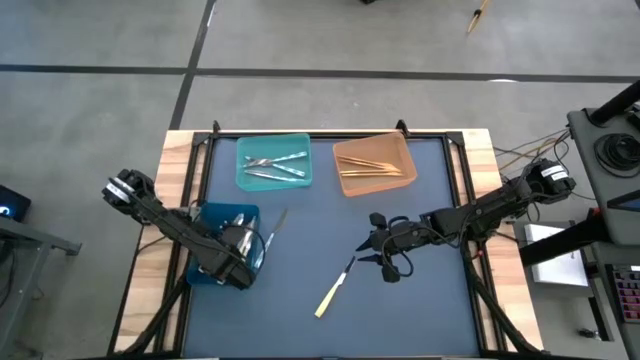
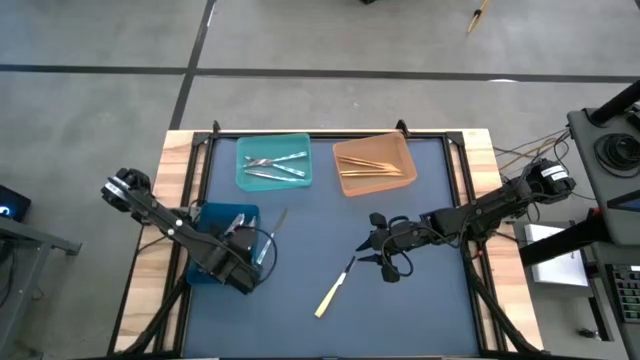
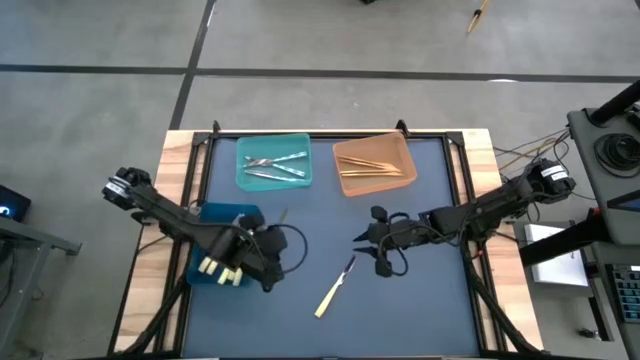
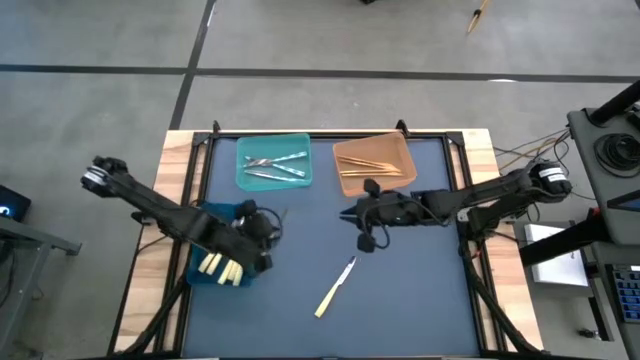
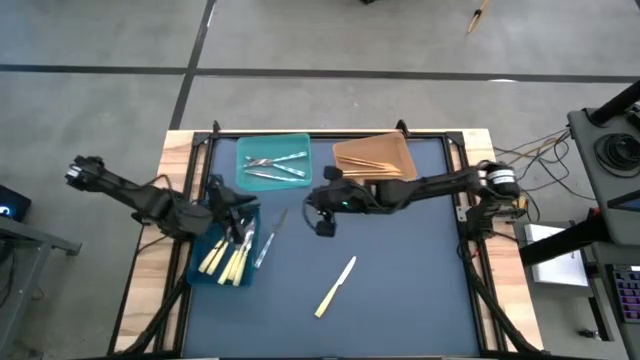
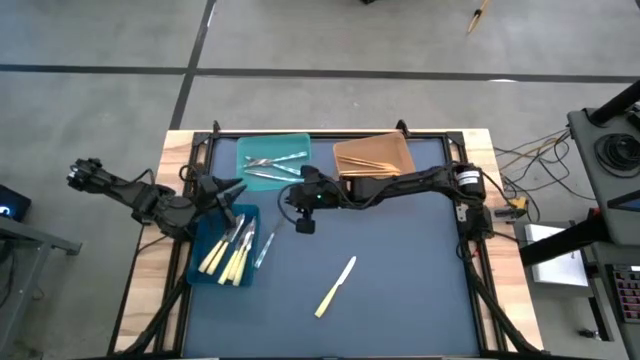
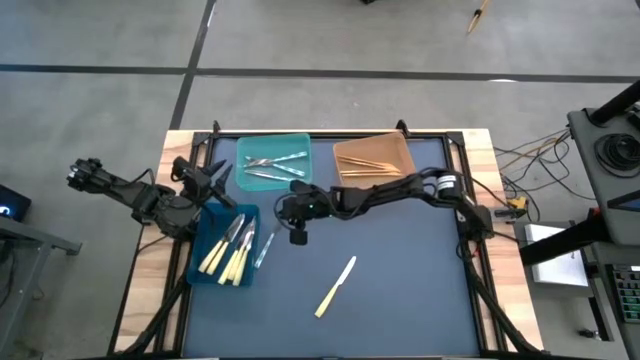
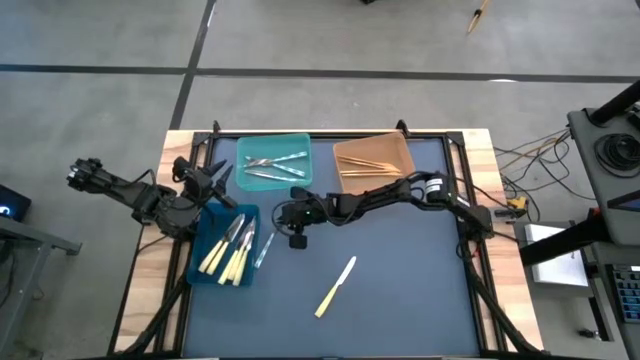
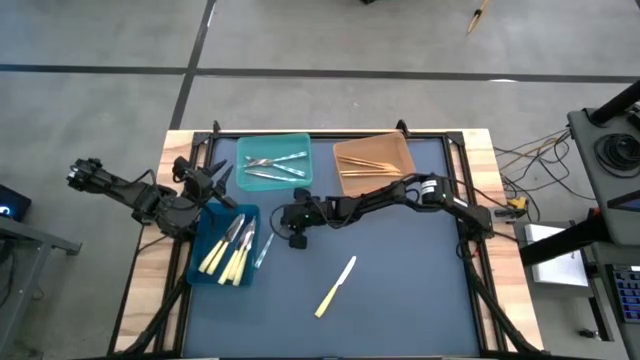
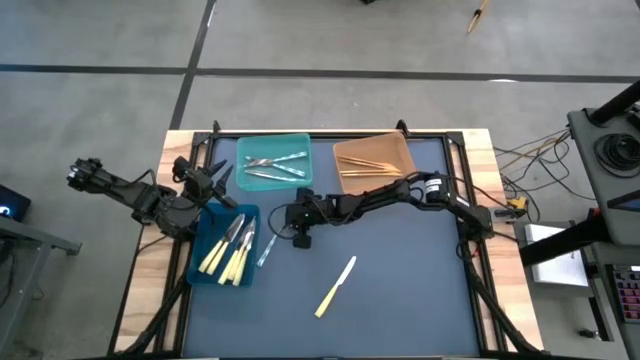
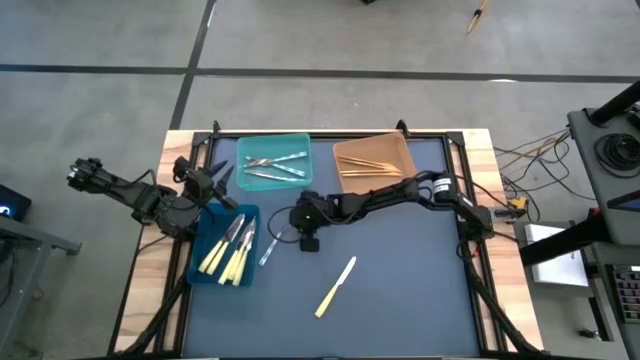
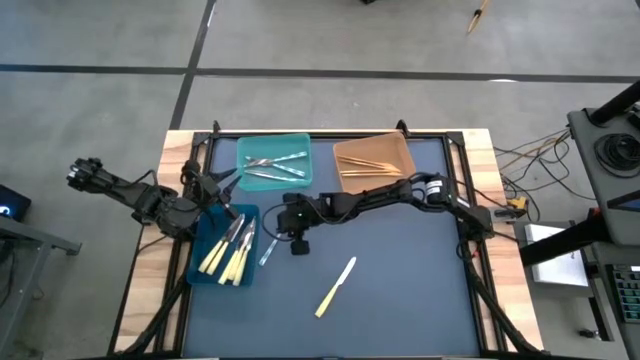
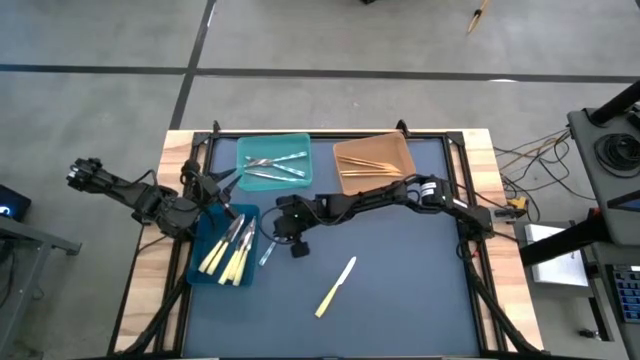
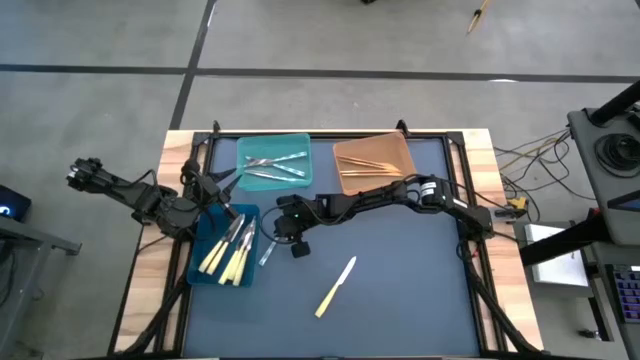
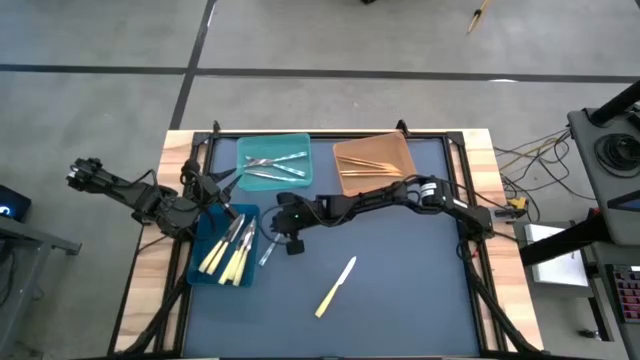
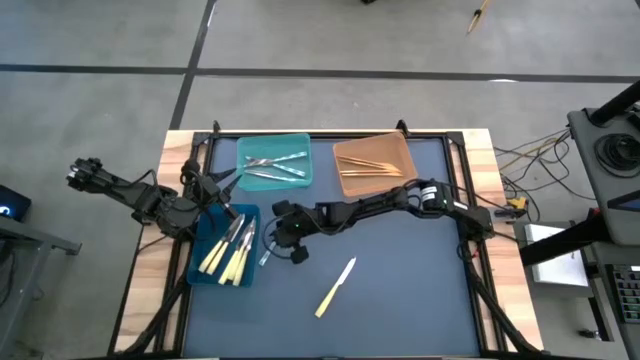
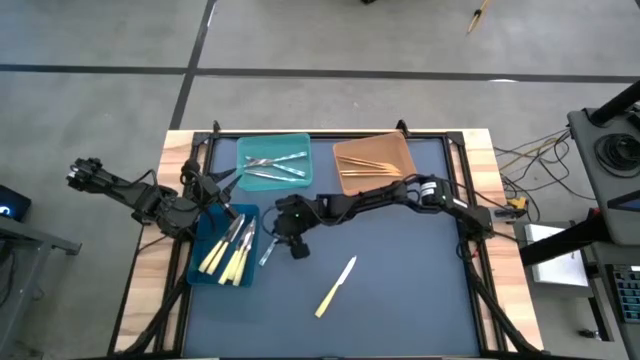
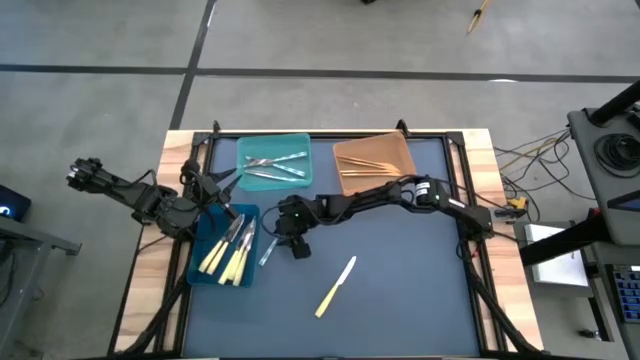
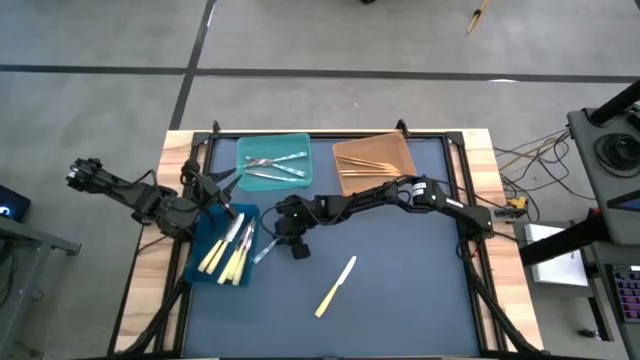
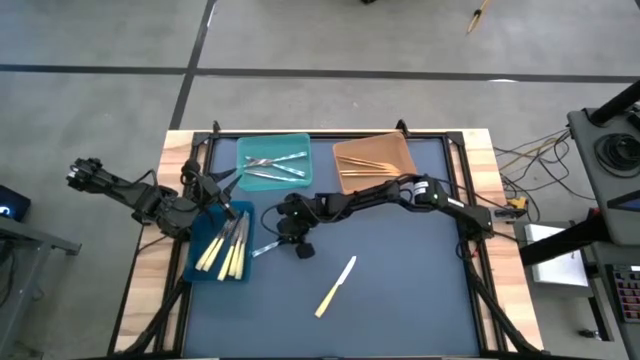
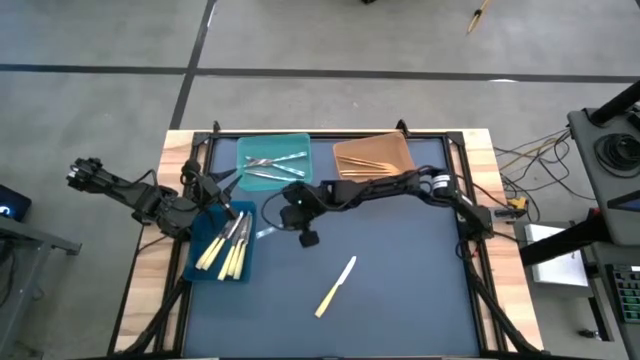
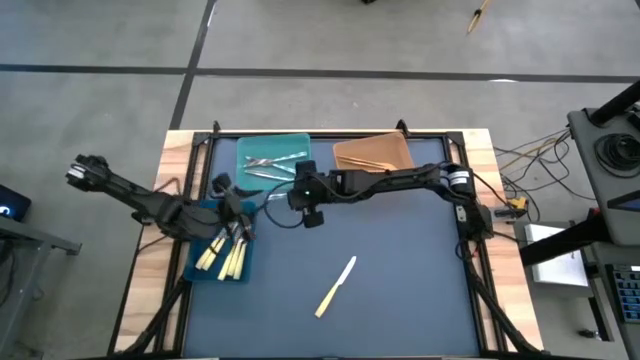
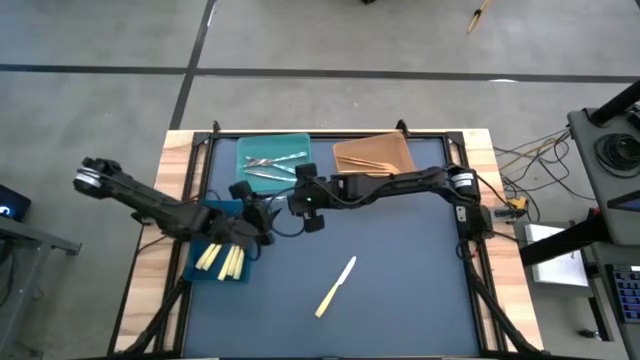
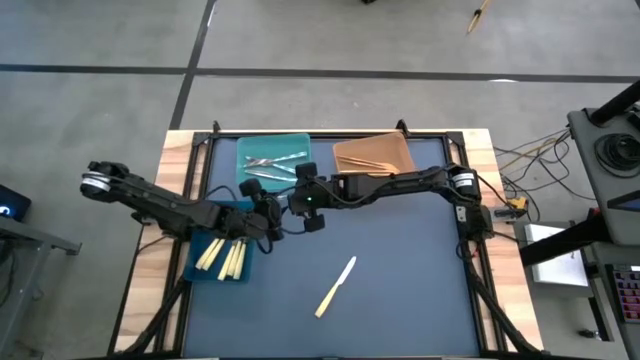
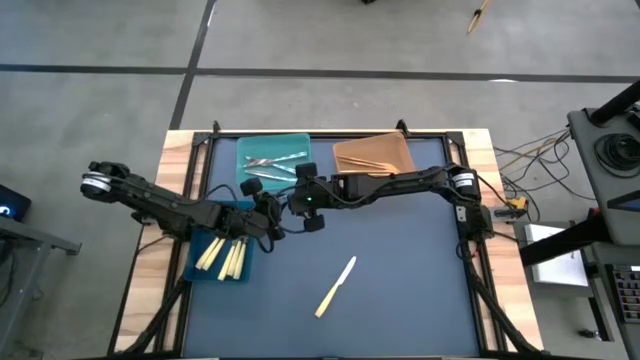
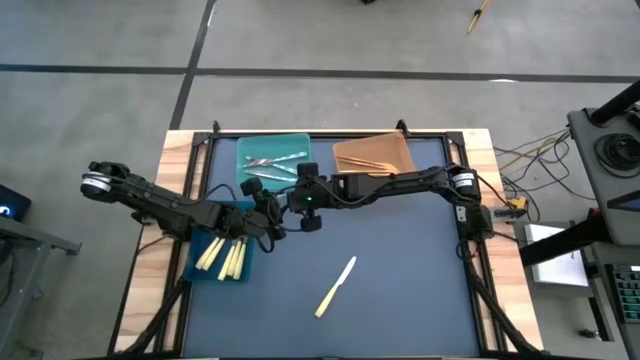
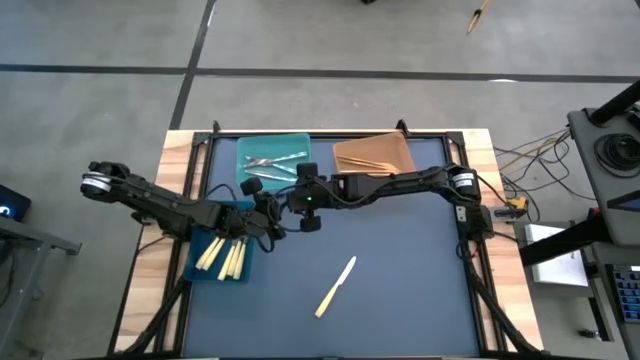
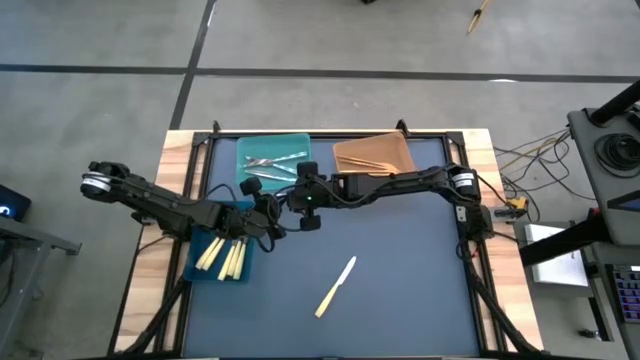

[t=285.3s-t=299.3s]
Task: Sort silverware by color (type)
Put the white knife into the light blue bin

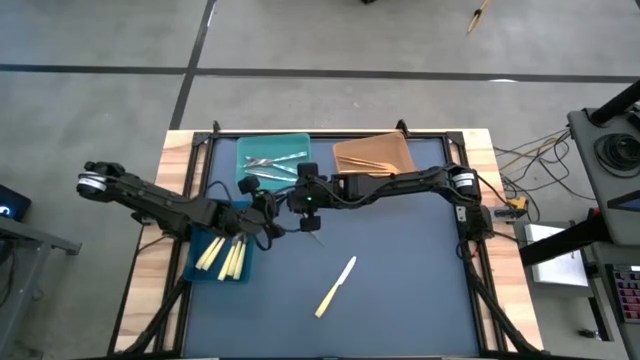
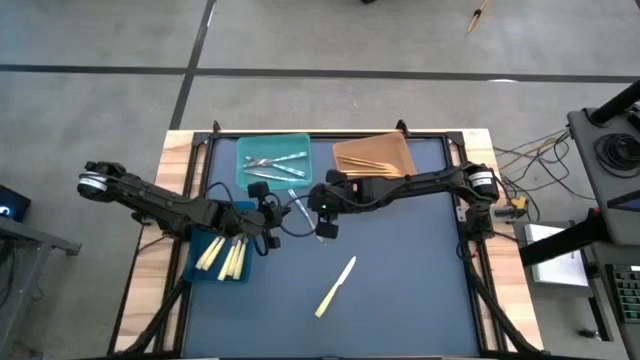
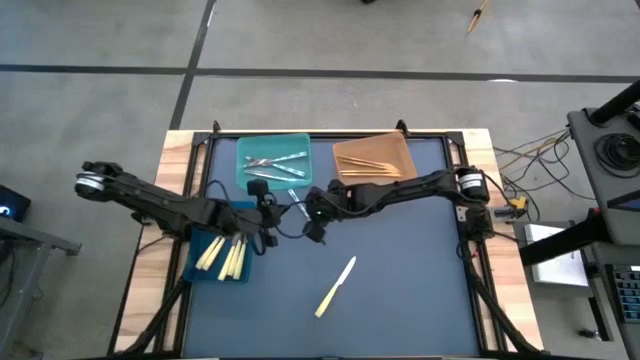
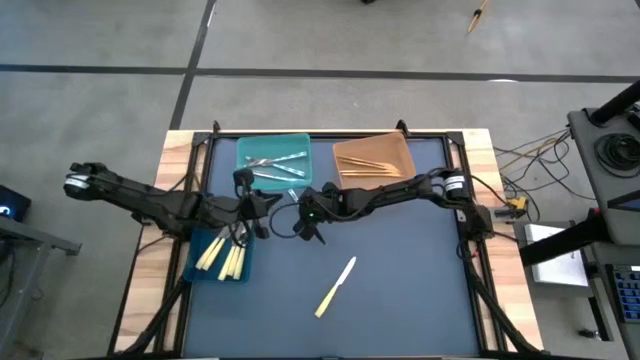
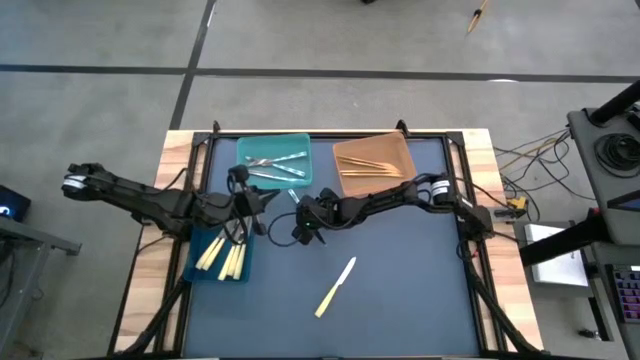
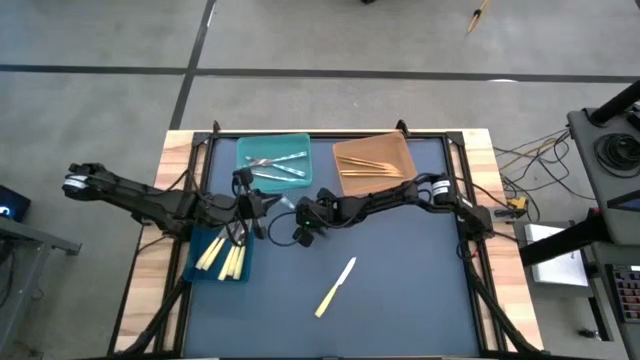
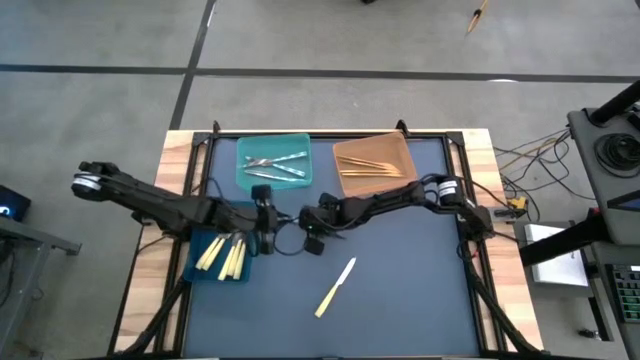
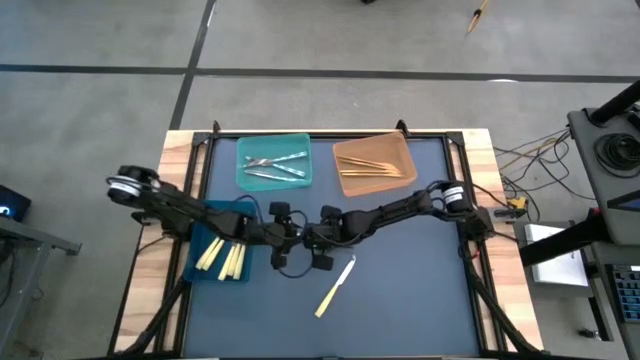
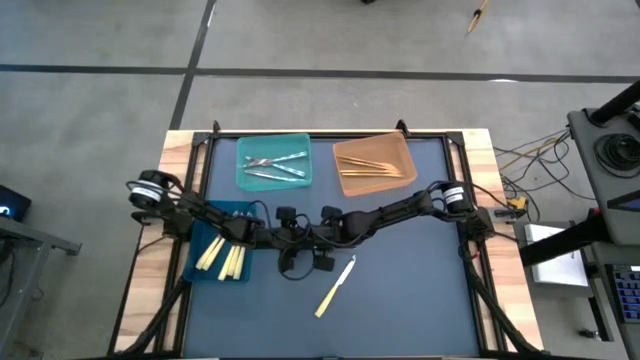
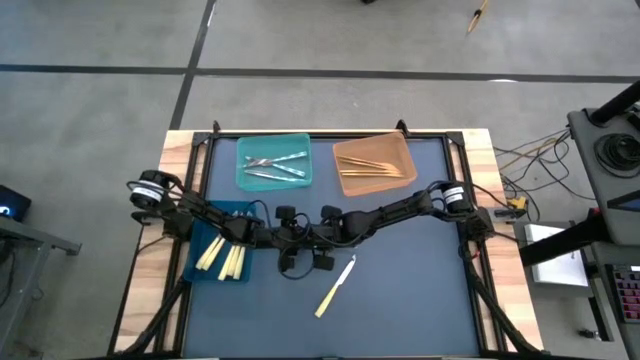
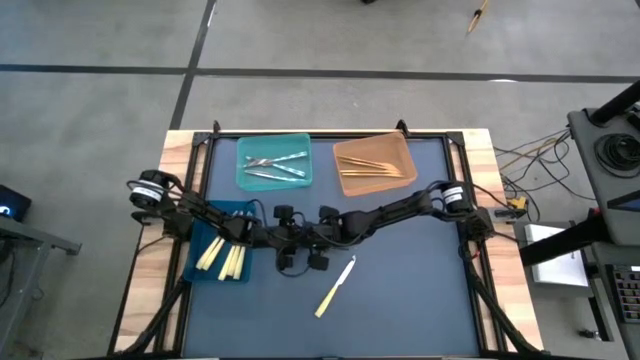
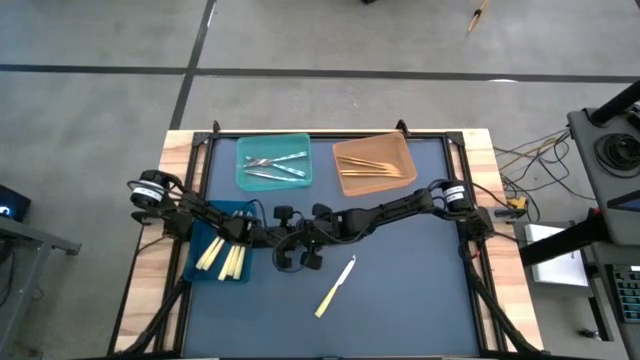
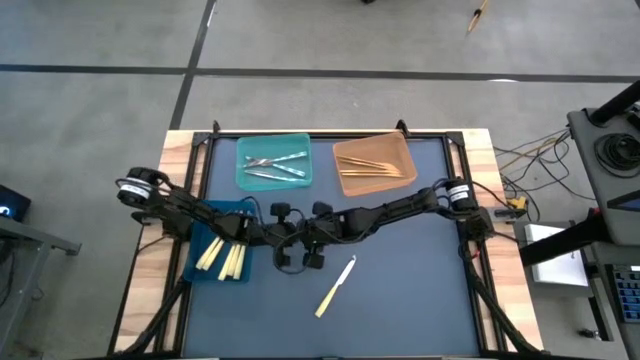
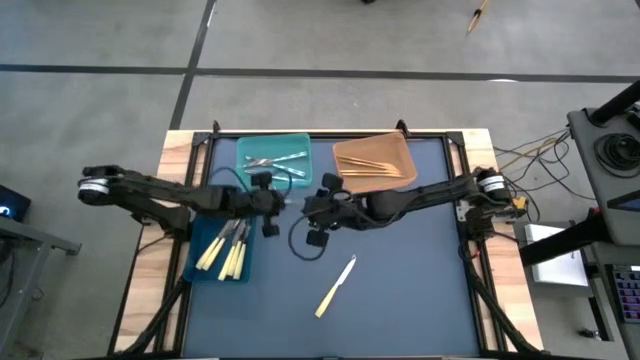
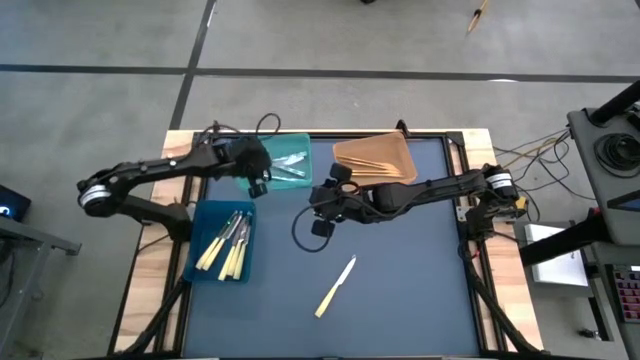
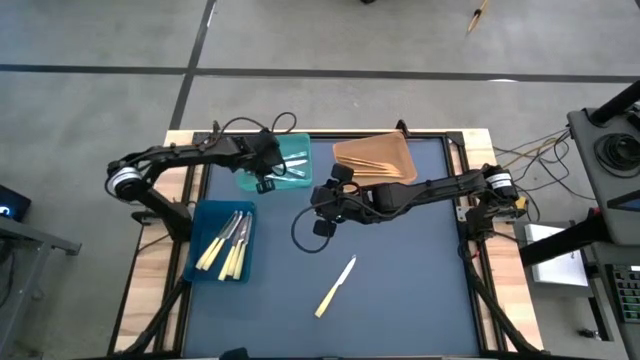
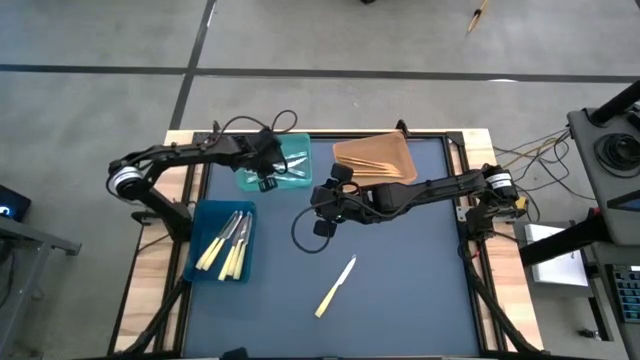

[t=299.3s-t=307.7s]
Put the white knife into the light blue bin
